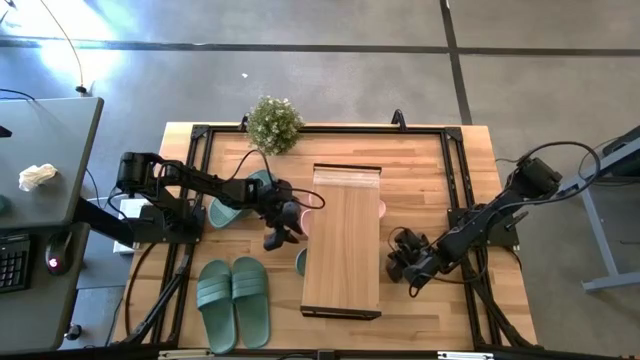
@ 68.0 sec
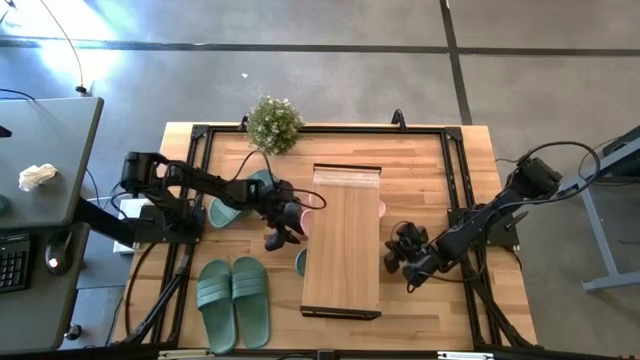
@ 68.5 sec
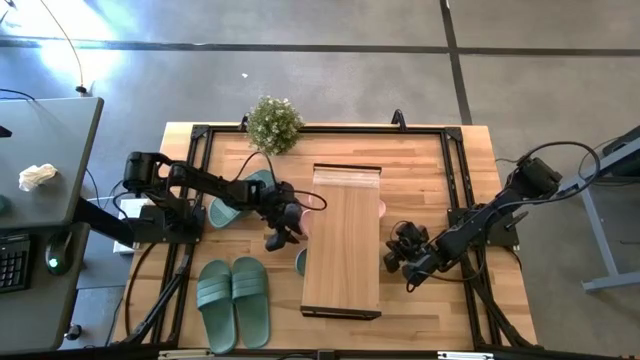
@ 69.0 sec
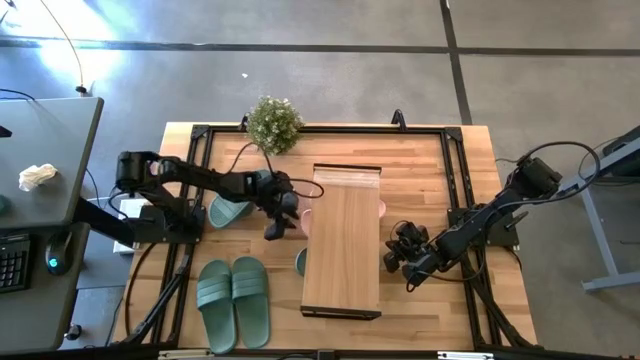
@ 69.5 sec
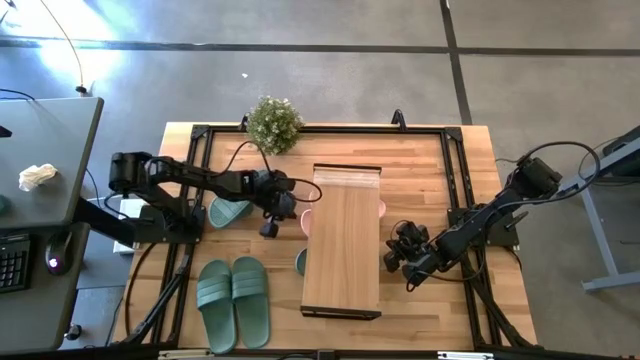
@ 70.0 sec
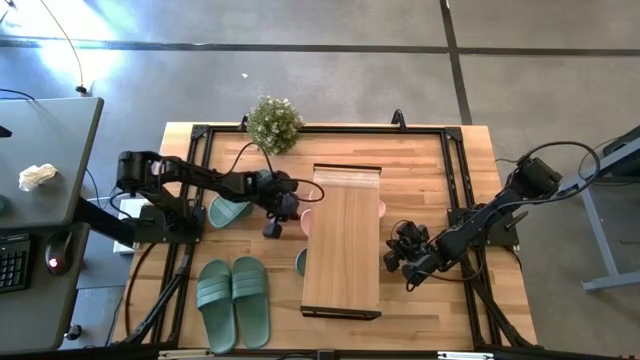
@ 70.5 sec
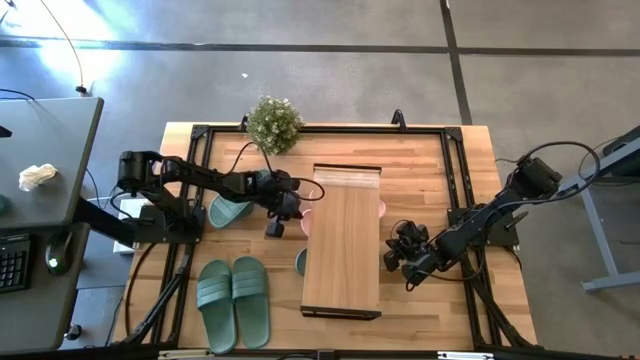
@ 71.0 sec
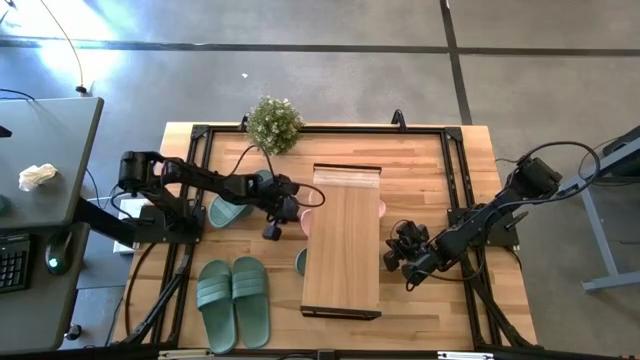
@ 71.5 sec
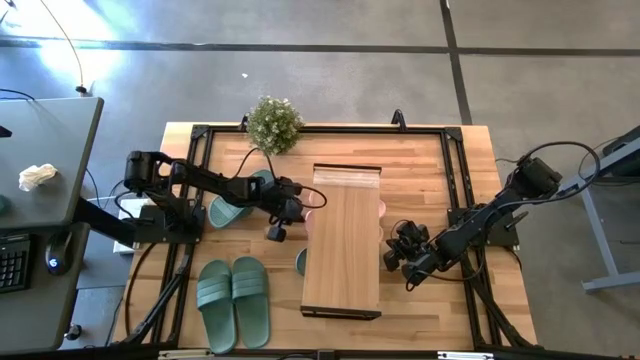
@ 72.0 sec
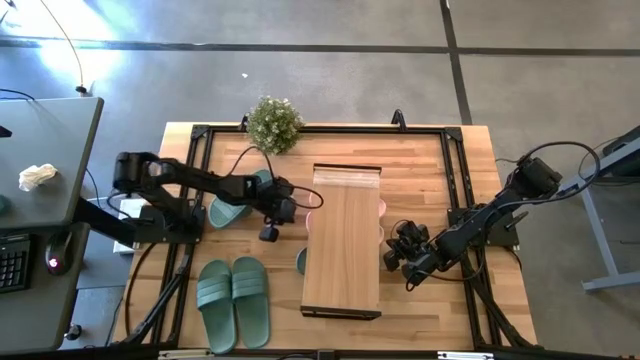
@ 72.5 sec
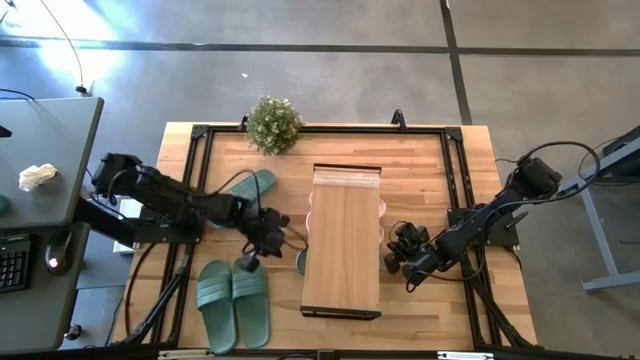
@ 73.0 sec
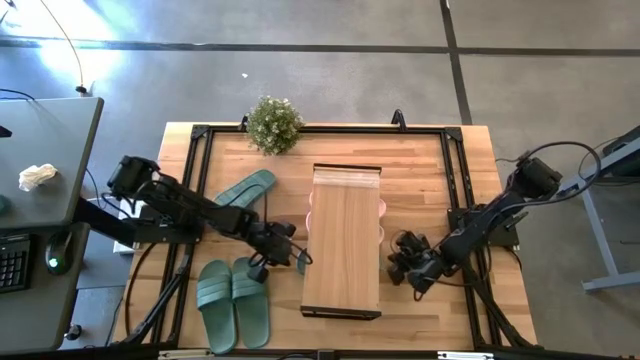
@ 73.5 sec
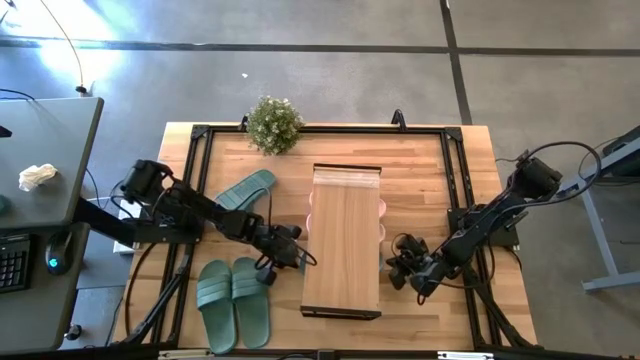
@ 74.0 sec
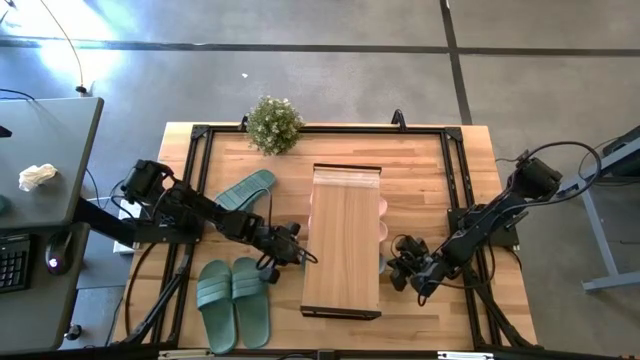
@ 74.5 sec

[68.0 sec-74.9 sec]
Task: Pick and place slides into the shelf
Adjust the slippers under the shelf

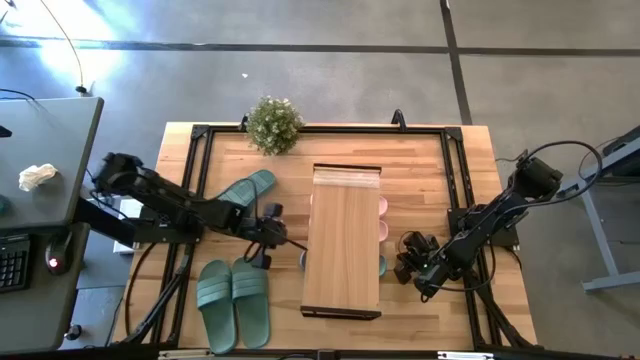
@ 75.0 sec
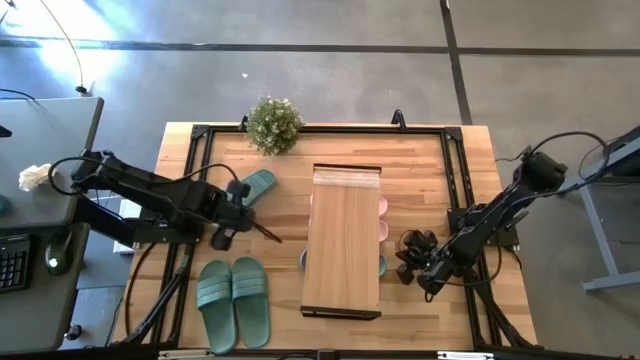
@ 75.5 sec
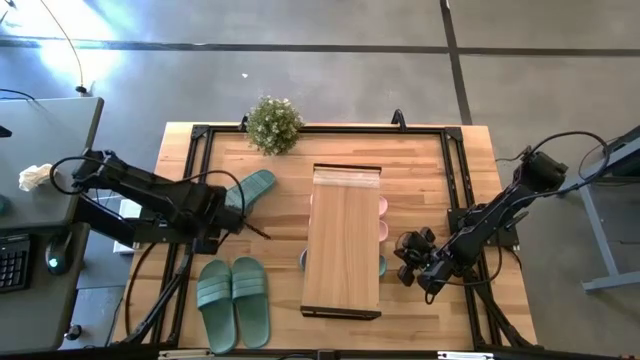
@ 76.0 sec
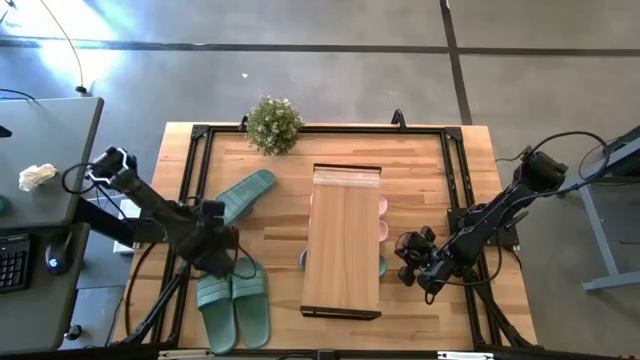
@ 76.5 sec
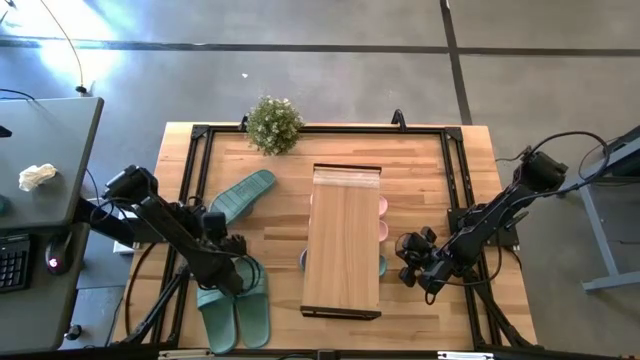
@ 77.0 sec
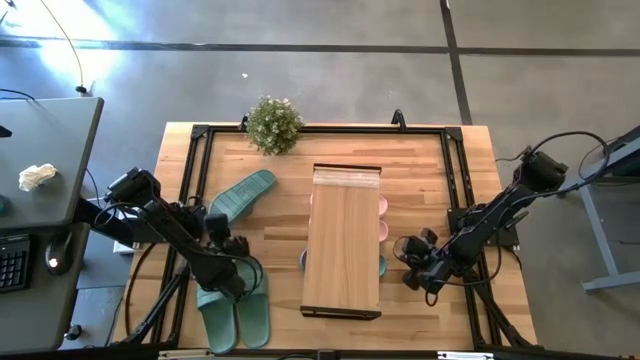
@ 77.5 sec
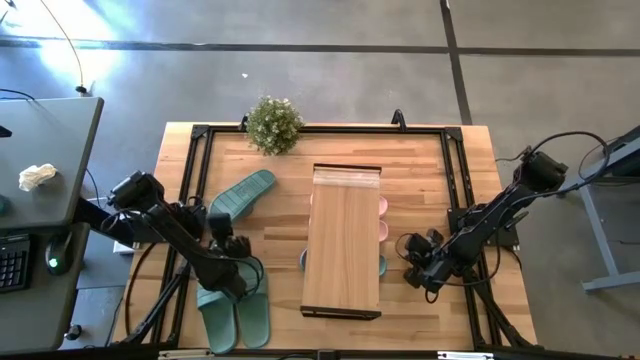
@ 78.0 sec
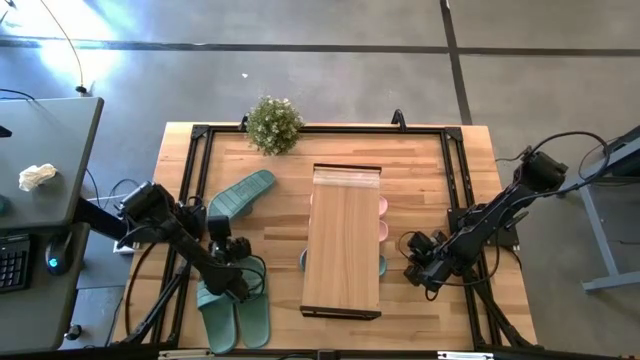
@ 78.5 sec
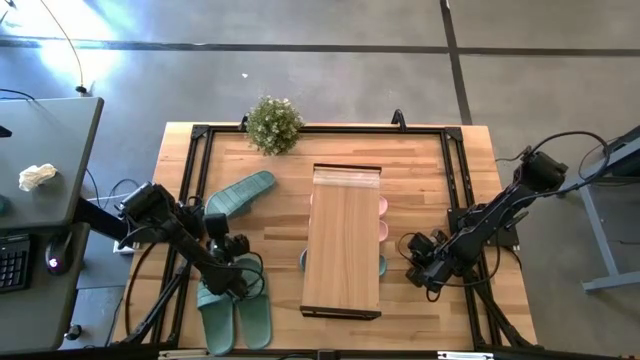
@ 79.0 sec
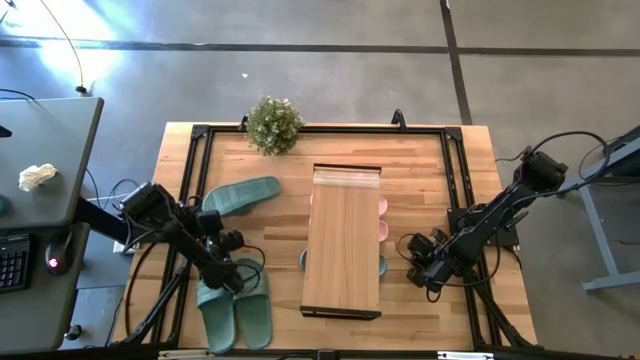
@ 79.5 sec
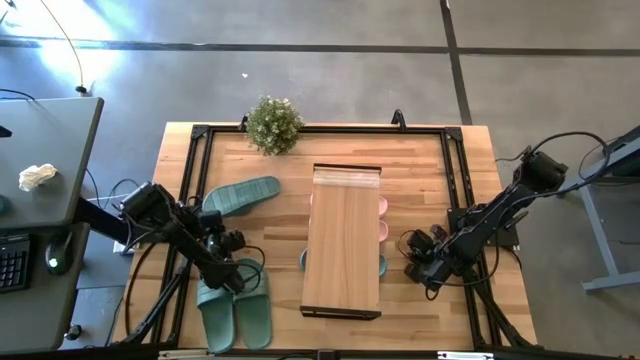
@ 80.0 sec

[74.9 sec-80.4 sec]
Put the top green slipper under the shelf

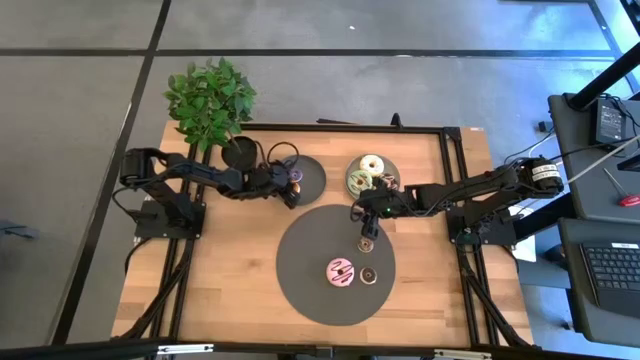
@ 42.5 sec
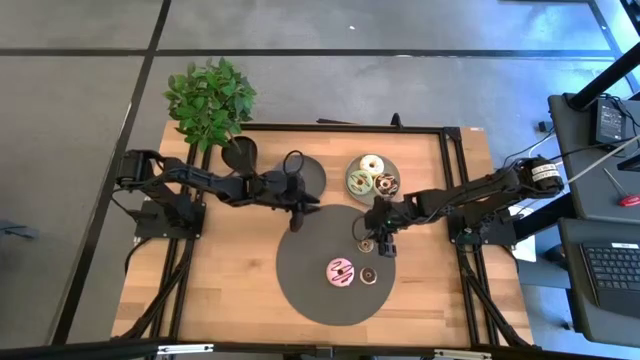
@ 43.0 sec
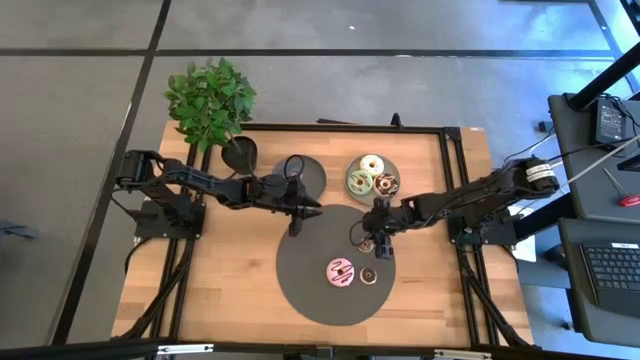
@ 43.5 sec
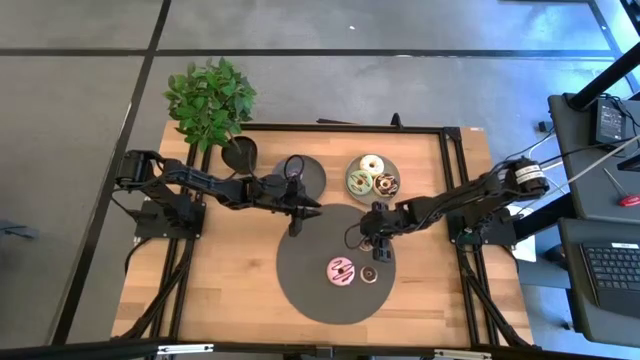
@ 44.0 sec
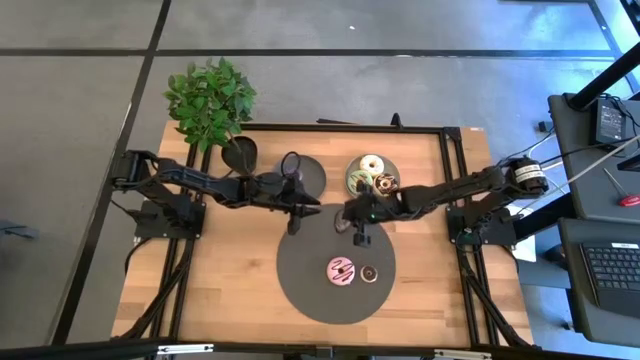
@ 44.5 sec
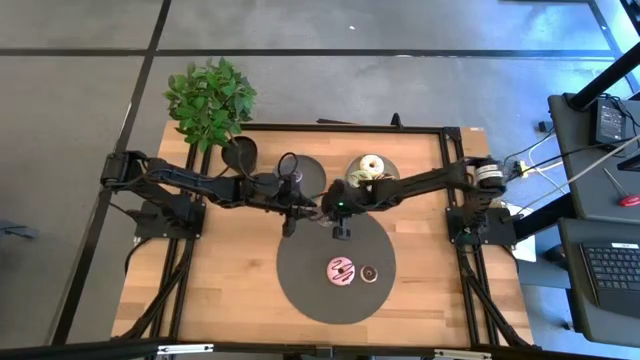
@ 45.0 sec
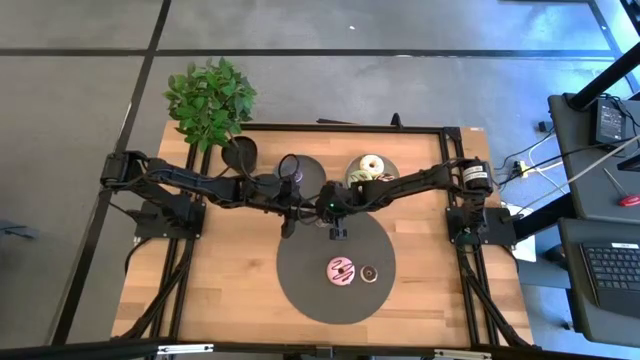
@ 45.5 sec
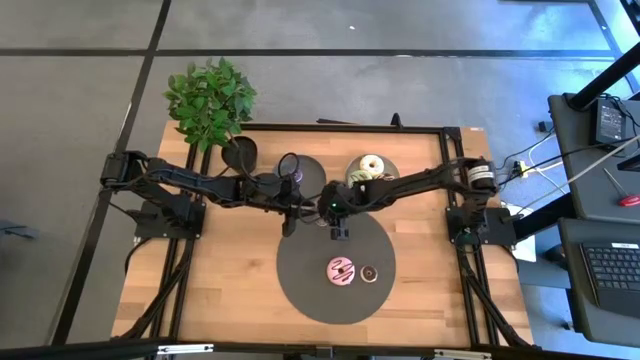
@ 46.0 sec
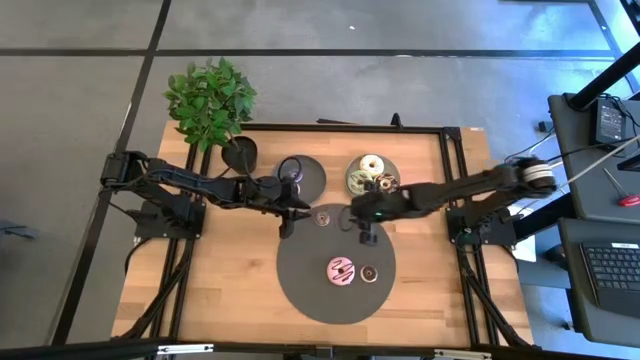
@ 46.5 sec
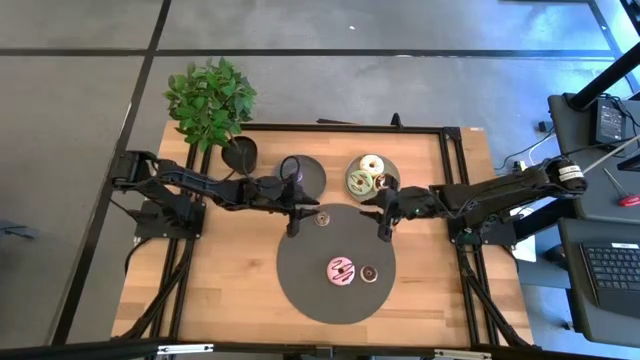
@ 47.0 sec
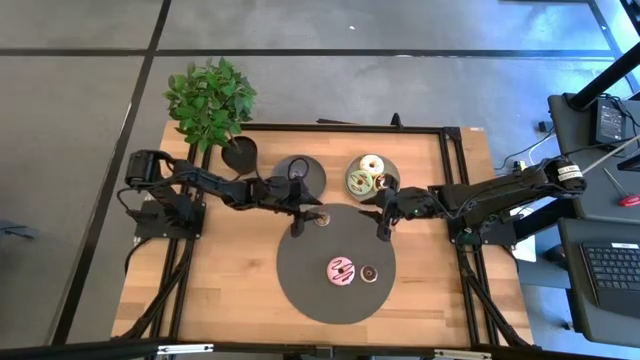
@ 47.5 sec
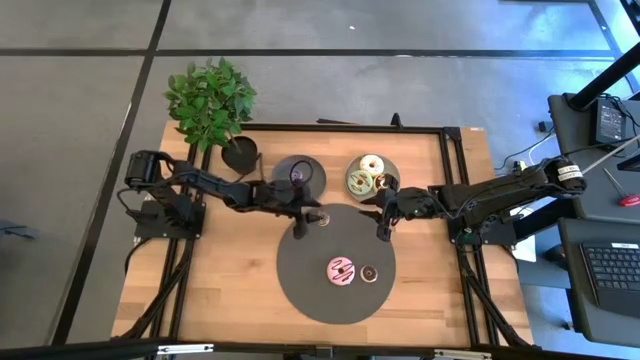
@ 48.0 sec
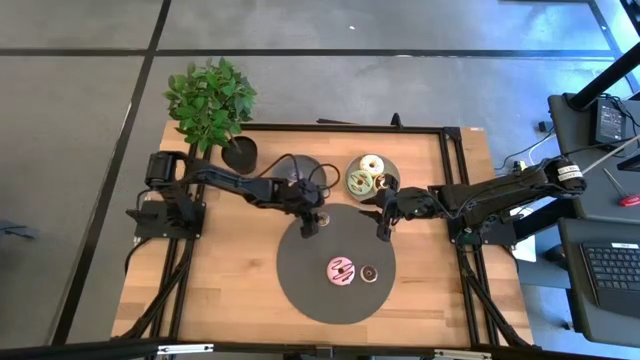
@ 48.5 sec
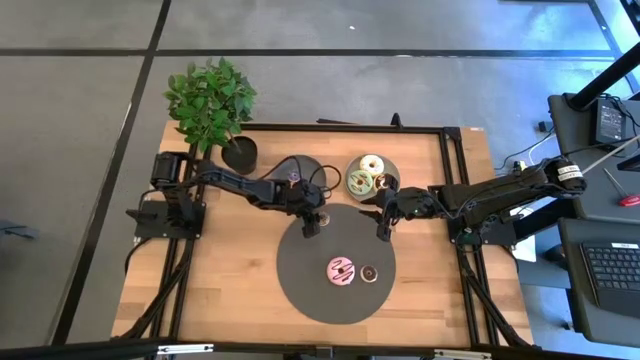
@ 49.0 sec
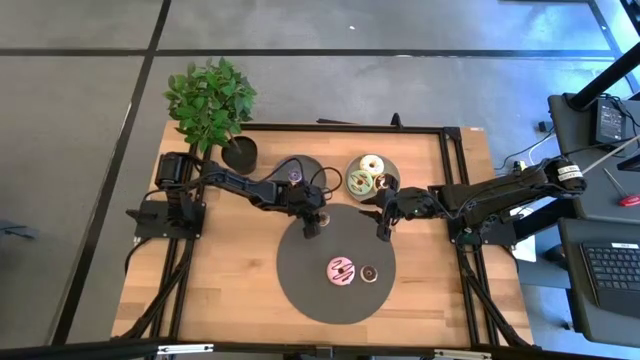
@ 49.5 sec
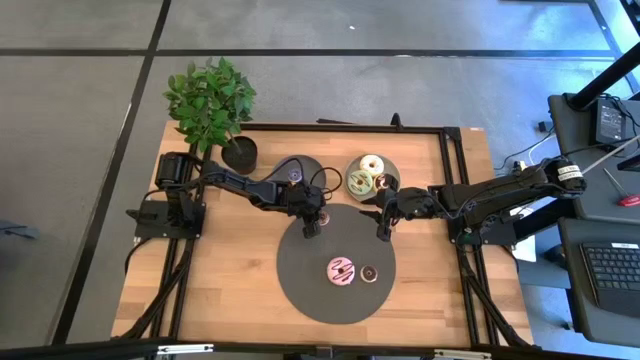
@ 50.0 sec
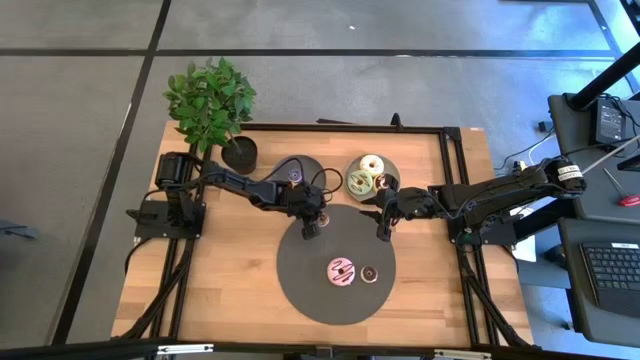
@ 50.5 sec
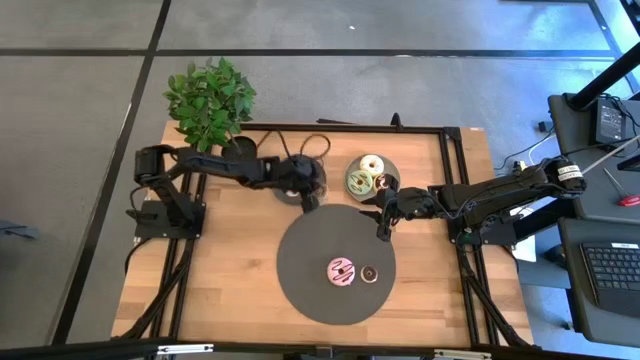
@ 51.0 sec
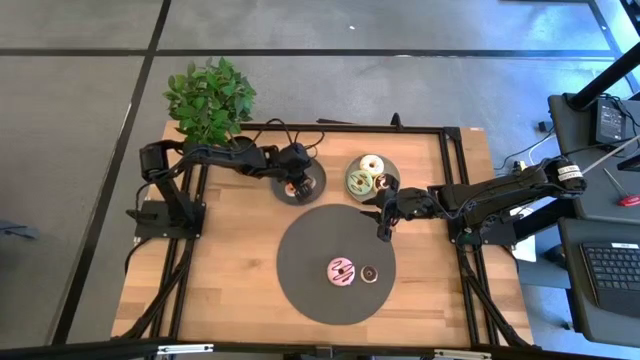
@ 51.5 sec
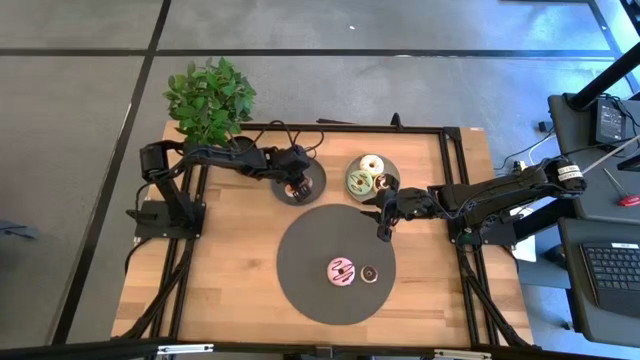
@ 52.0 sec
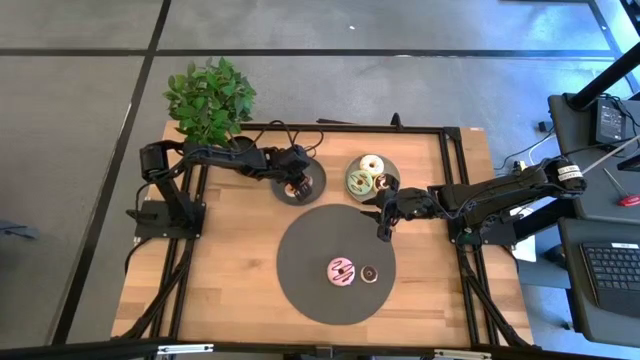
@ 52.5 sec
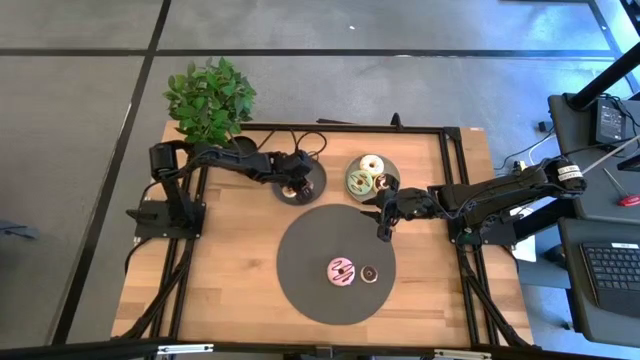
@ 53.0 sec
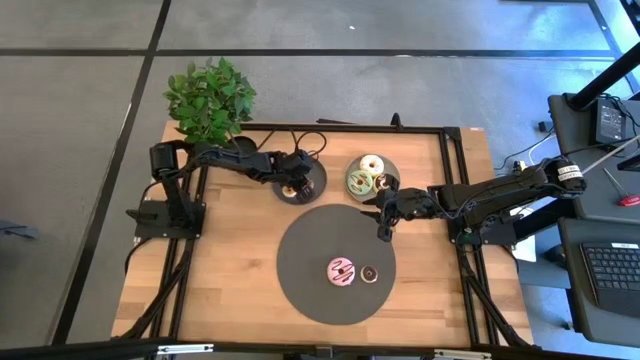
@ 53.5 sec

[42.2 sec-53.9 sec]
Task: Pick & Place donuts
Put the small light brown donut on the dark gray plate
